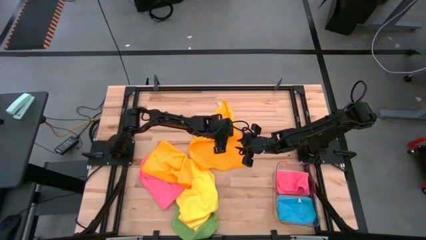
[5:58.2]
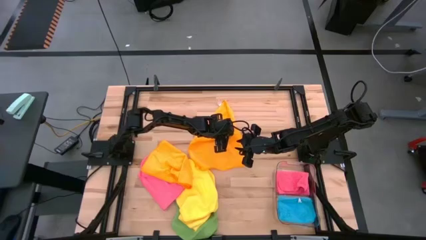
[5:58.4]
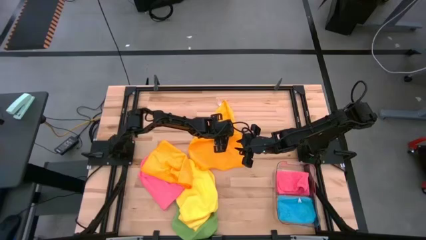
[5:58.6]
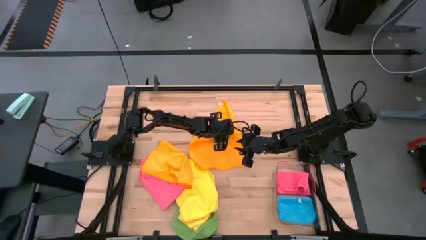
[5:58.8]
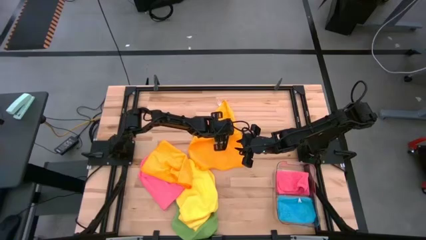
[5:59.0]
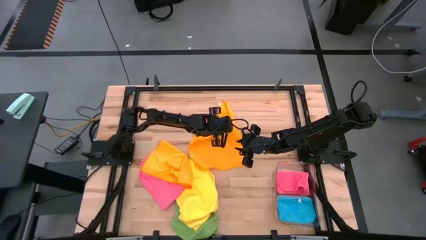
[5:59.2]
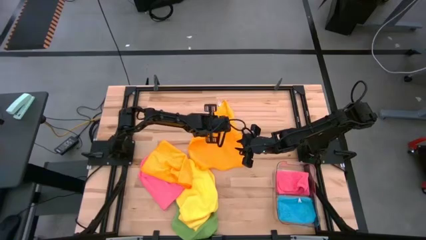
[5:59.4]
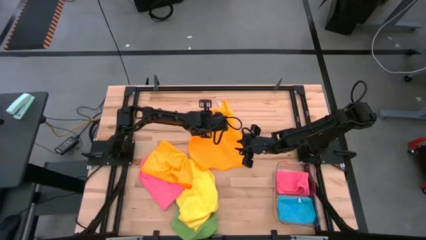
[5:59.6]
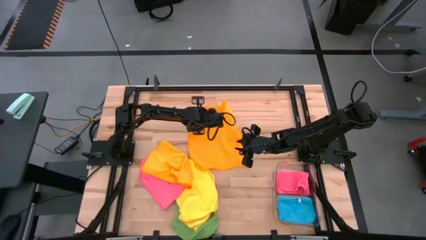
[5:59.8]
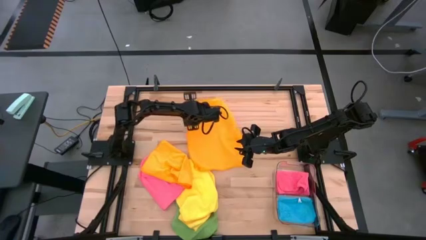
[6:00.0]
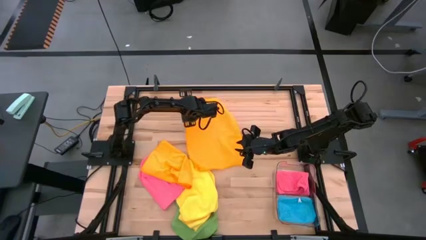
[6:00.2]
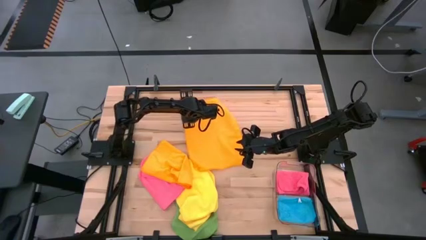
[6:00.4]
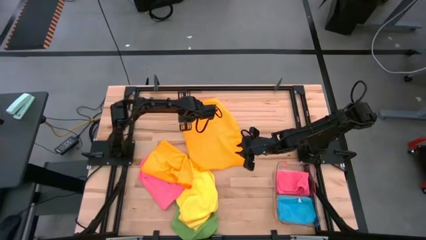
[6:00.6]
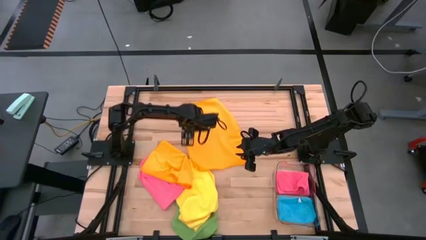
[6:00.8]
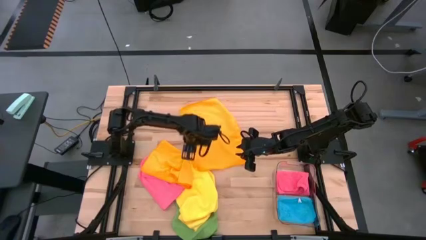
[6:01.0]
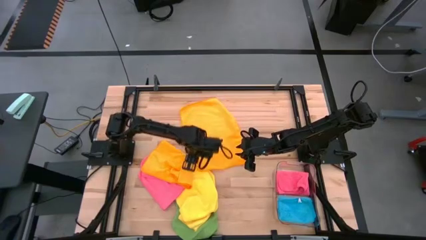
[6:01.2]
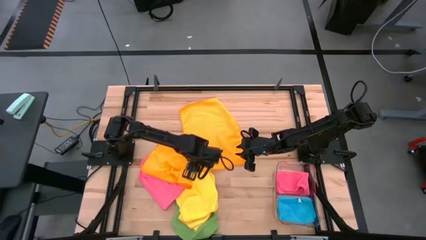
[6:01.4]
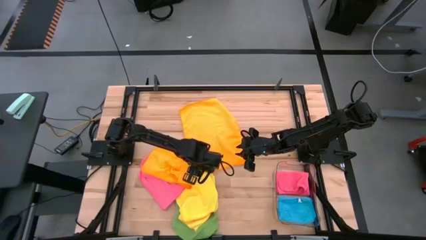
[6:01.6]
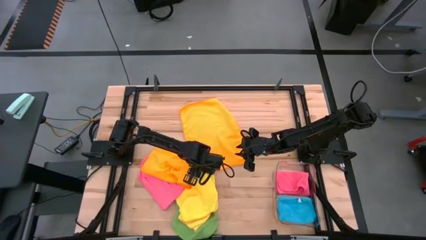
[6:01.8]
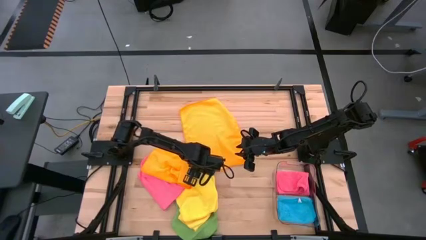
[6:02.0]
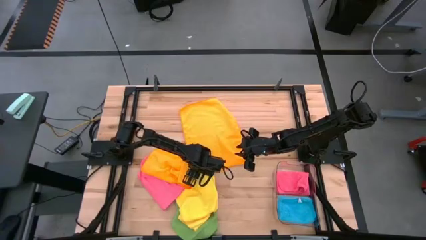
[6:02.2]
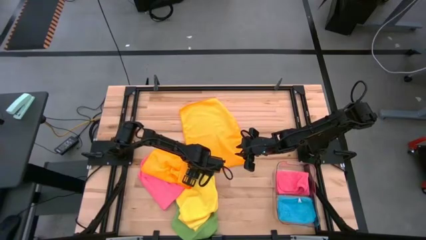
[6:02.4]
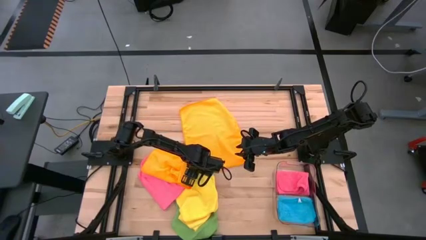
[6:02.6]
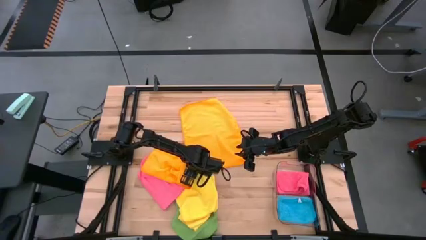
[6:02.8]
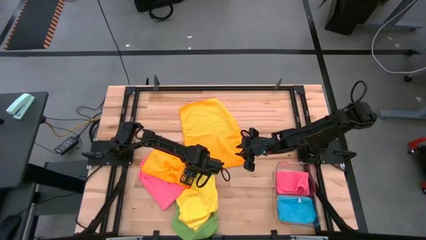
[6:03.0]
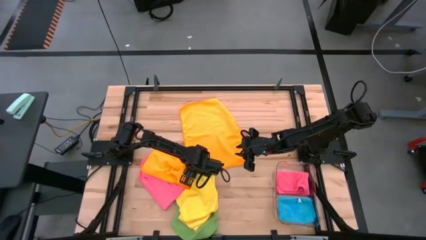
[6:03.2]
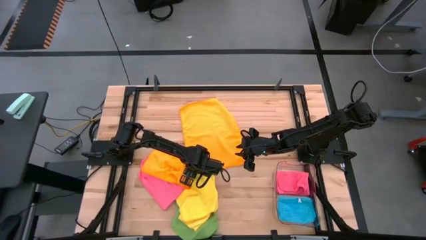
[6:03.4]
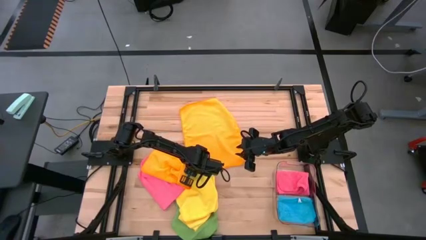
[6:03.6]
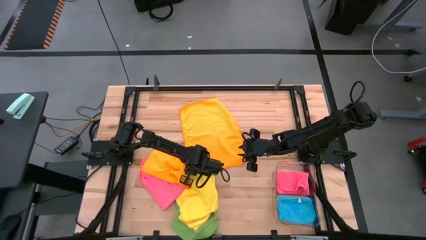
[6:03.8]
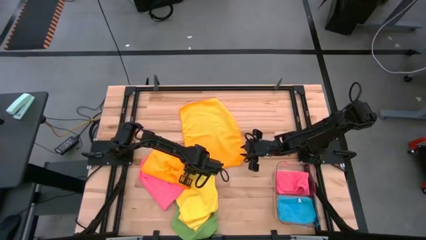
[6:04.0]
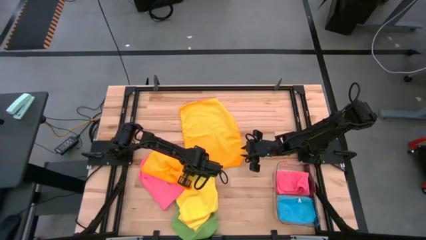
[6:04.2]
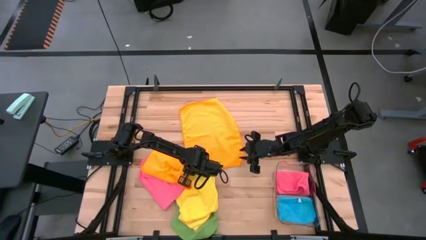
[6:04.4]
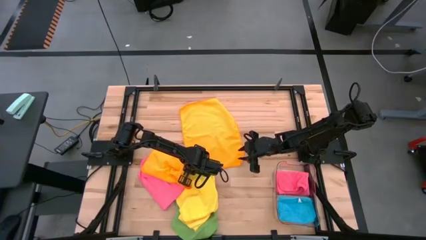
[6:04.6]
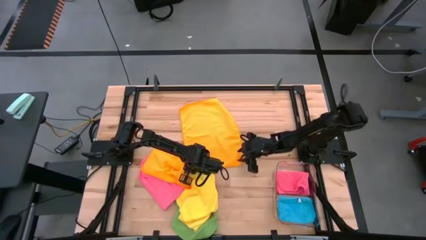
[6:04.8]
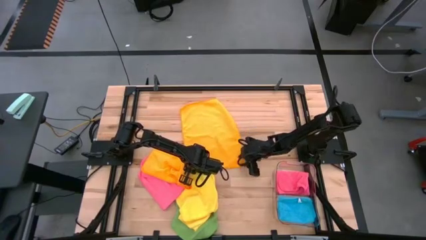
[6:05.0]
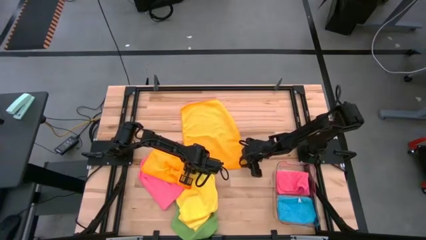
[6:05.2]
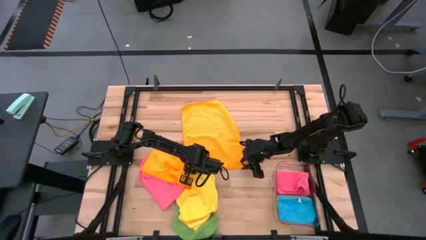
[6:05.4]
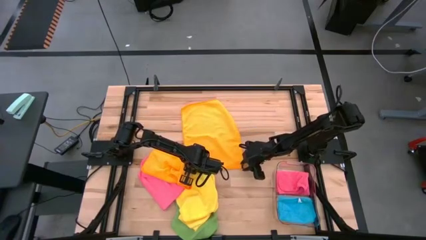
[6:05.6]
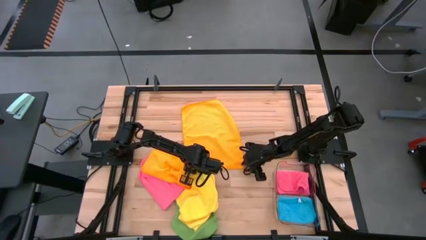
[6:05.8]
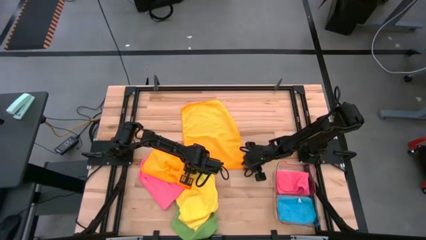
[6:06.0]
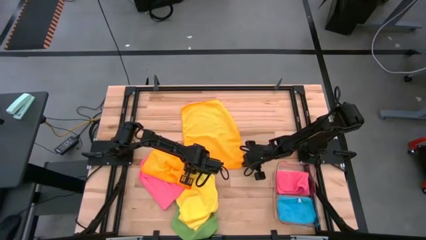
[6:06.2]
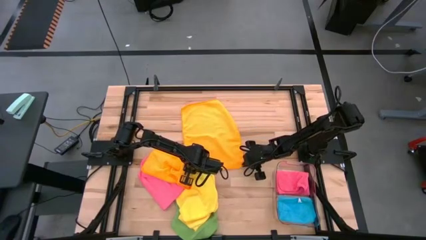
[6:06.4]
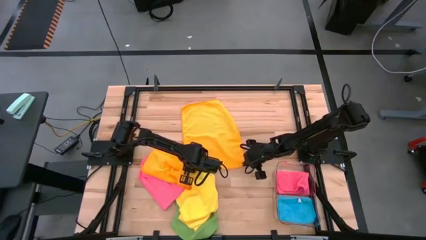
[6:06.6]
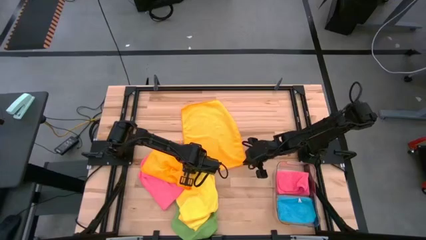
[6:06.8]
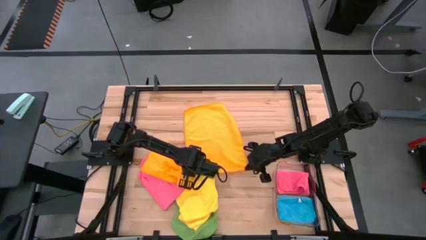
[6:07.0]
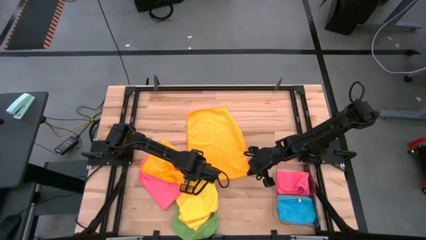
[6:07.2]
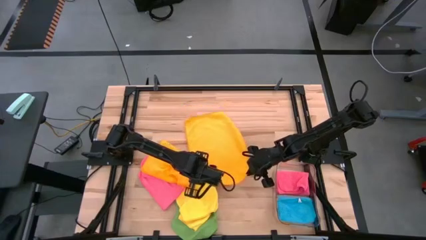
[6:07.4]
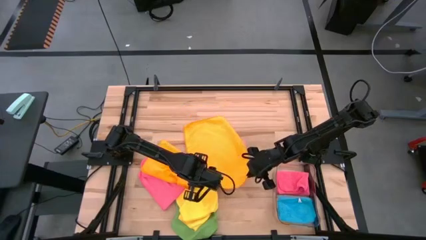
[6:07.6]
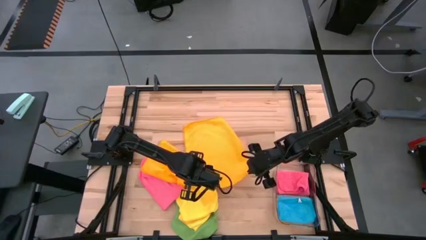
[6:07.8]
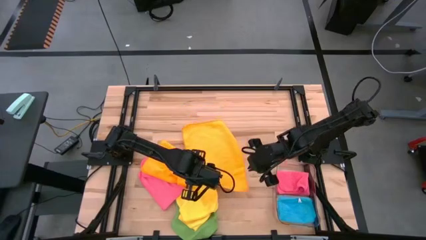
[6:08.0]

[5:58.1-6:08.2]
Task: Fold microfiber towels
Fold the orange towel

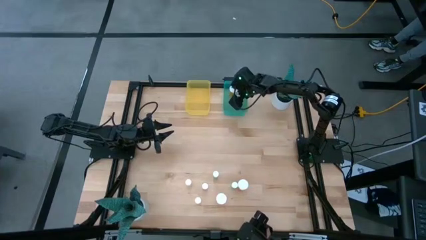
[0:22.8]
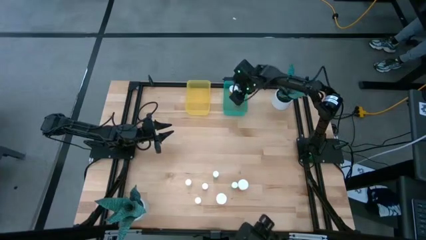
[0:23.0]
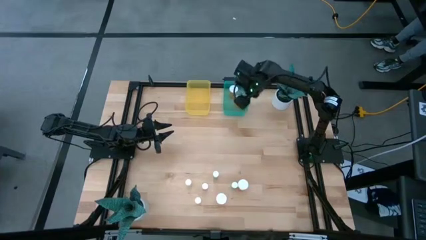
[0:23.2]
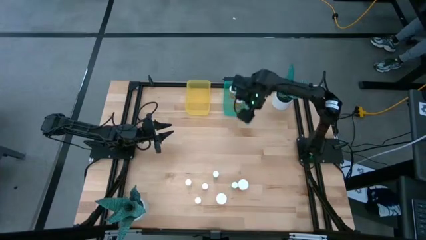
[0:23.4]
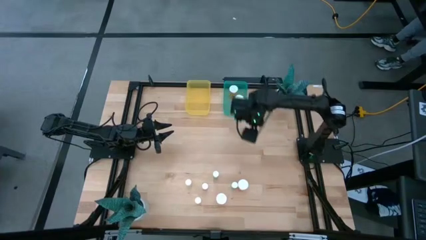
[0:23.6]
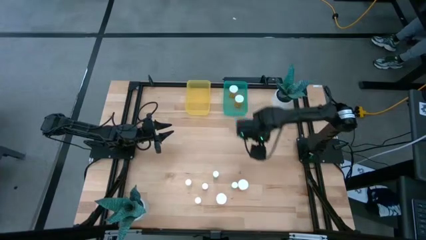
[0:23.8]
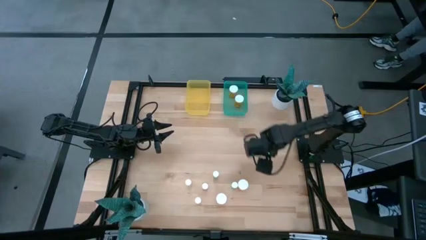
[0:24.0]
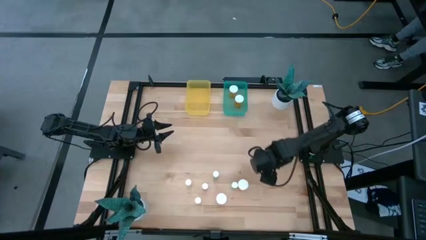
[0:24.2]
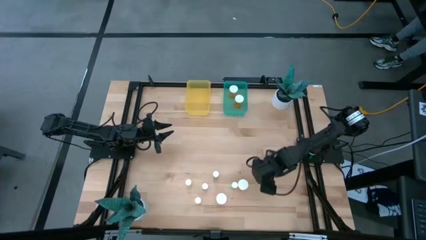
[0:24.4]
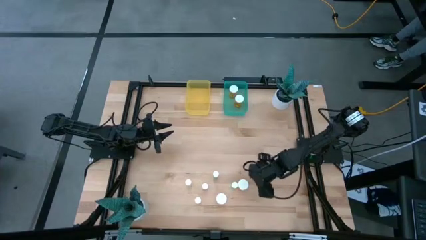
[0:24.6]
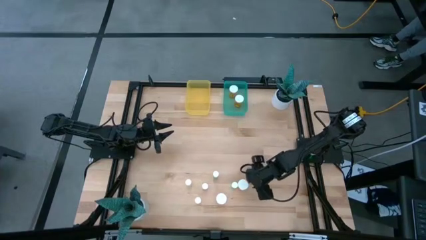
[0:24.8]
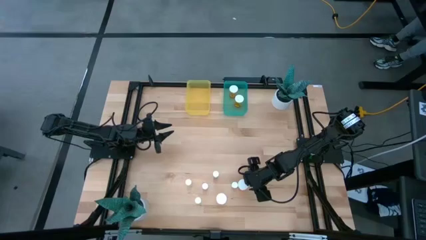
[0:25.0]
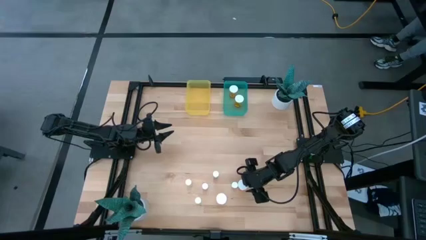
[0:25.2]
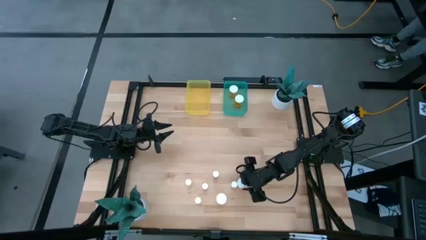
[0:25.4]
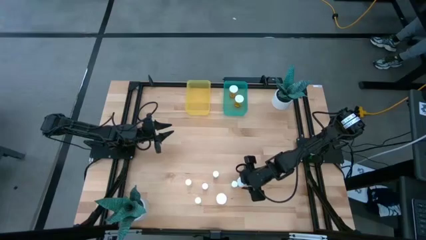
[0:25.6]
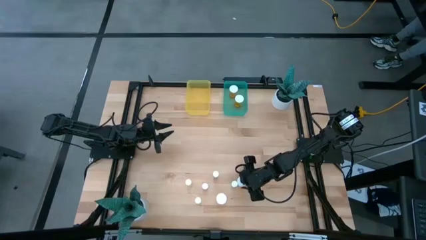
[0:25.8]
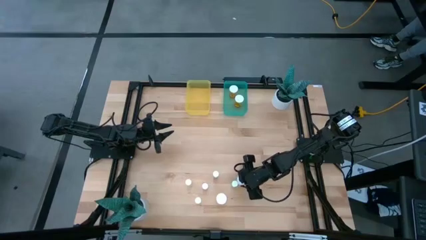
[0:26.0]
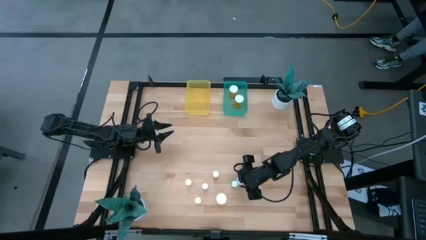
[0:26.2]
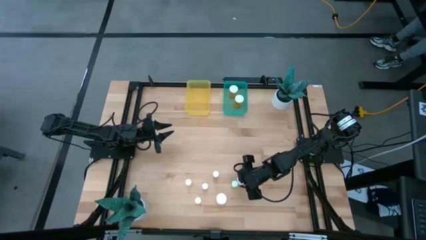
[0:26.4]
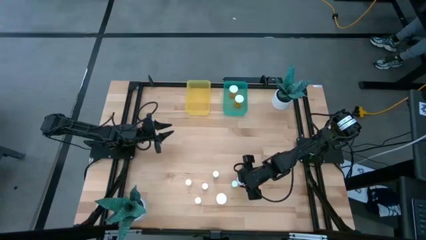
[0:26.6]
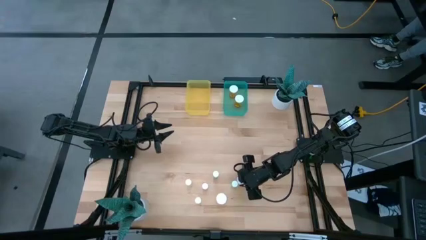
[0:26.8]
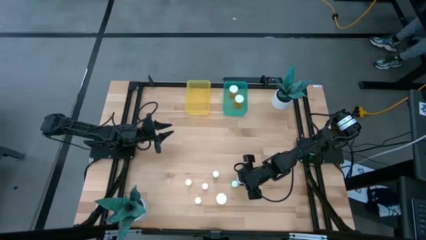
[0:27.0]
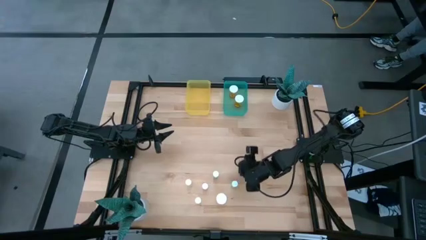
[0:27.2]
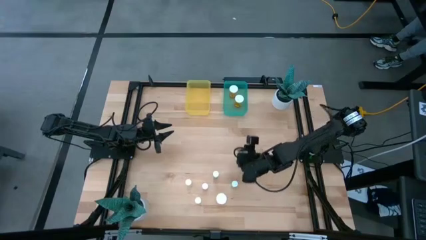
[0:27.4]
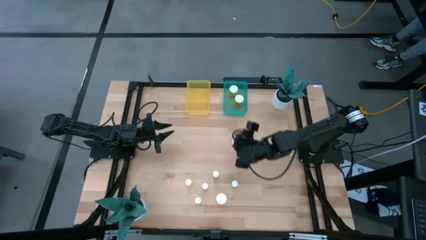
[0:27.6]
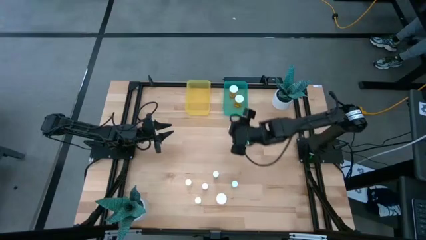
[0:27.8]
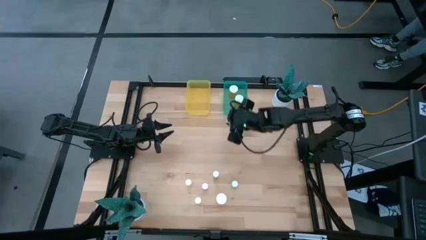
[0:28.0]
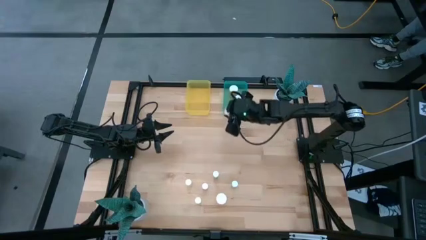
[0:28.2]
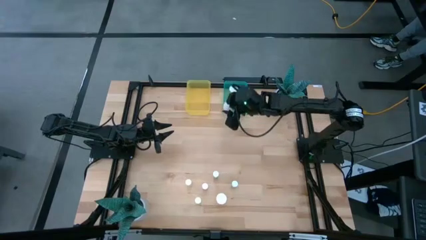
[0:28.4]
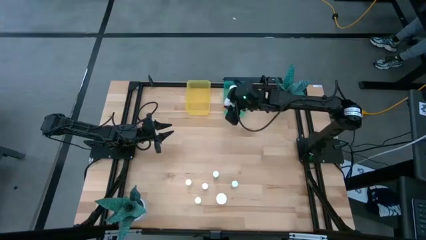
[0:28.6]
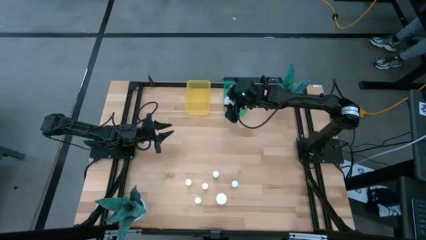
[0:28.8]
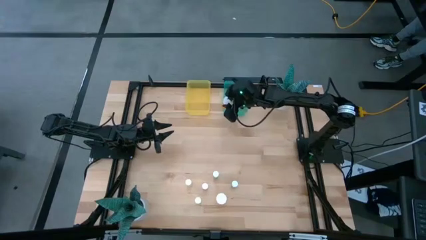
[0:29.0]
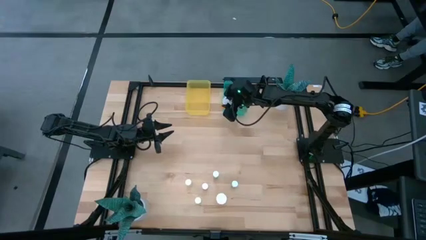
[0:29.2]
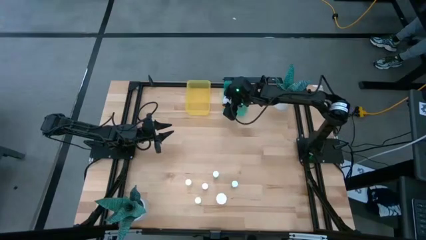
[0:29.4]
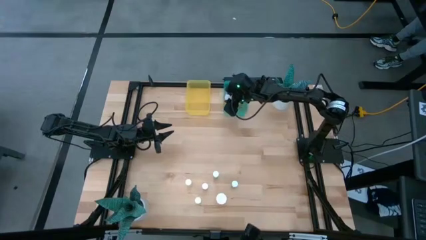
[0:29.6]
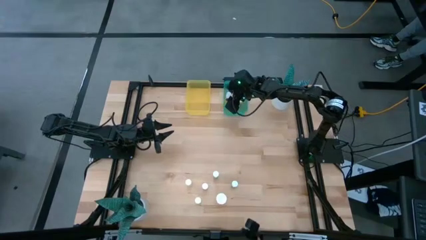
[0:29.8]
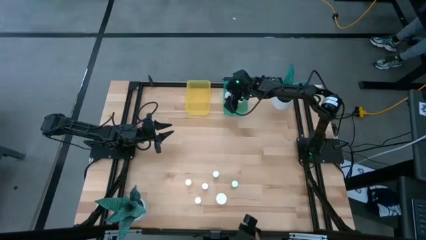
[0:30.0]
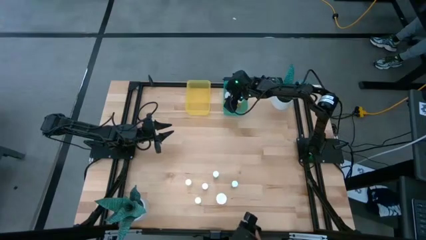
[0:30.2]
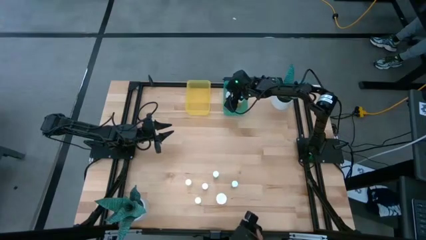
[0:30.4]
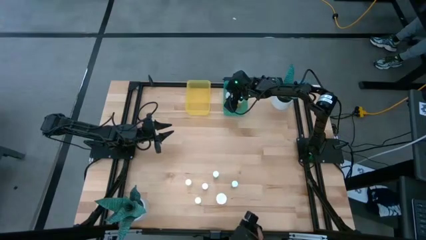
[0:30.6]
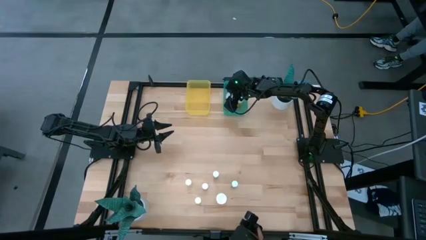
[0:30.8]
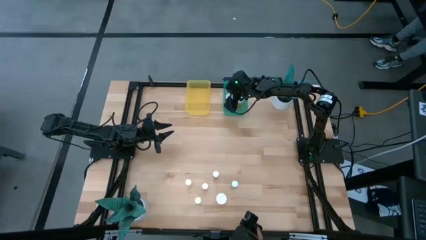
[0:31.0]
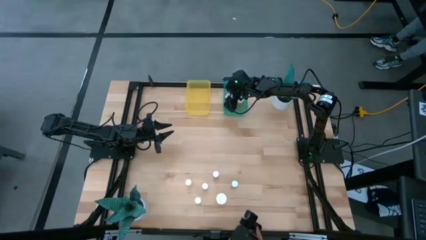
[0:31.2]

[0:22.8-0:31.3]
Task: Pick and place medicine bottles into bin by pill shape (circle, oval)
Put the orange capsule bottle into the green bin
